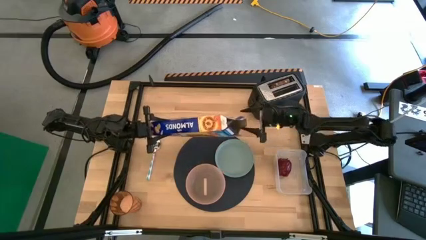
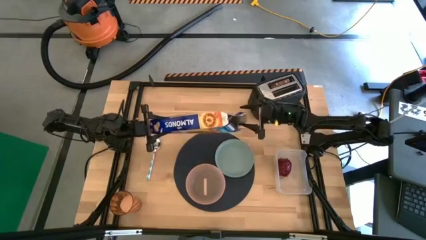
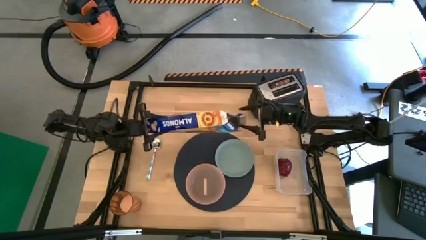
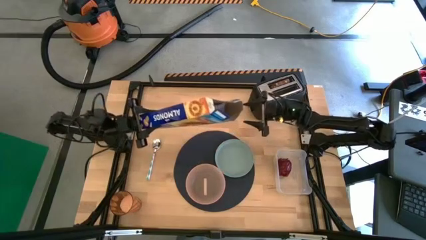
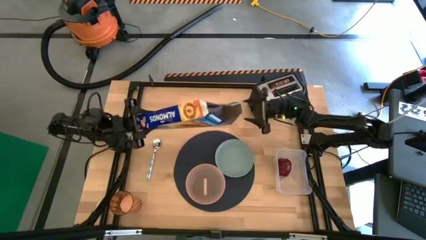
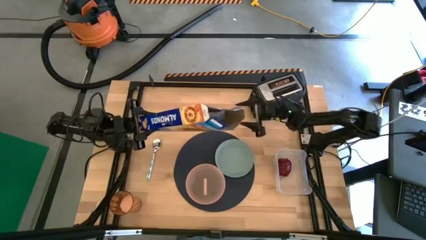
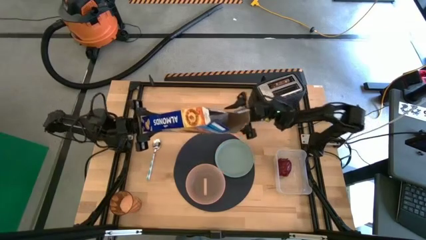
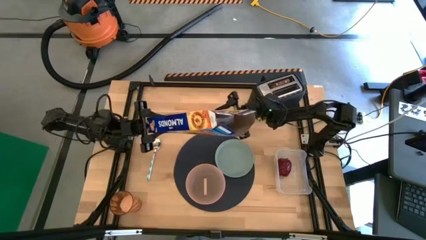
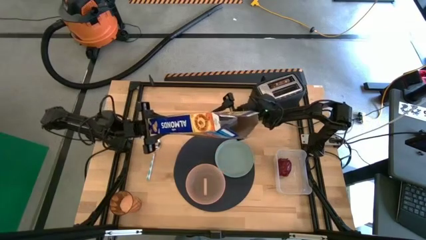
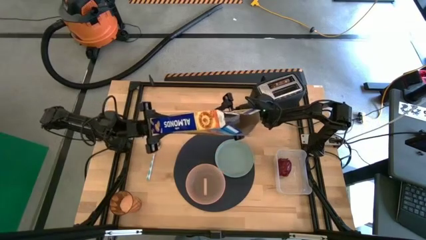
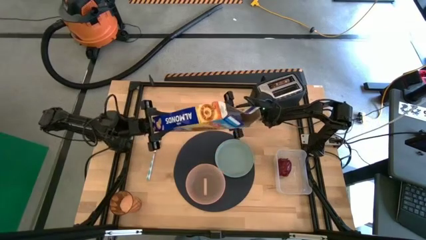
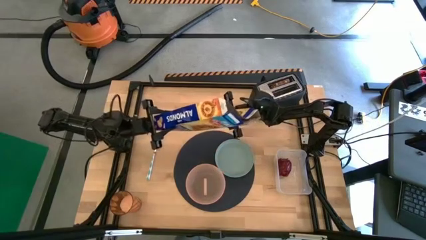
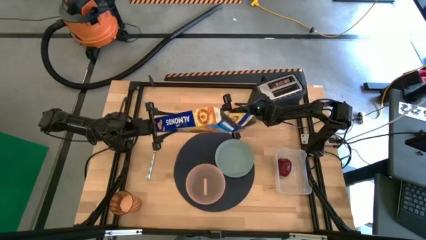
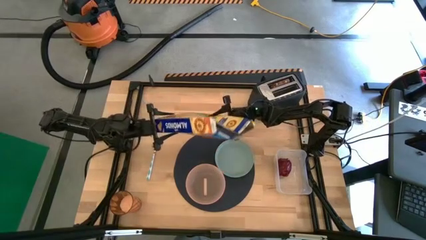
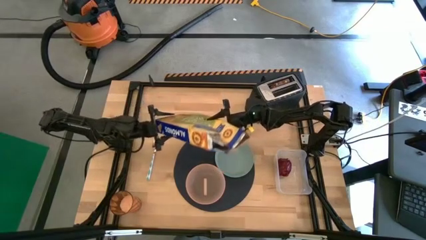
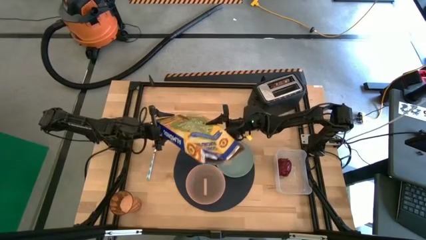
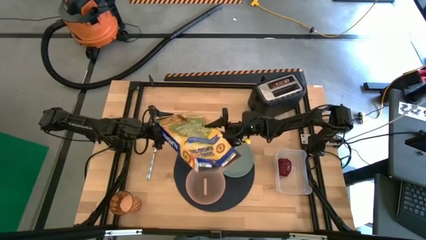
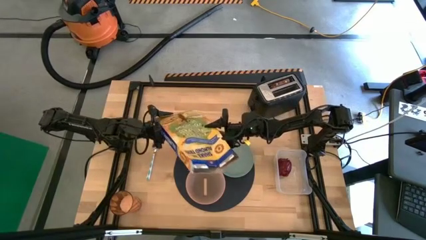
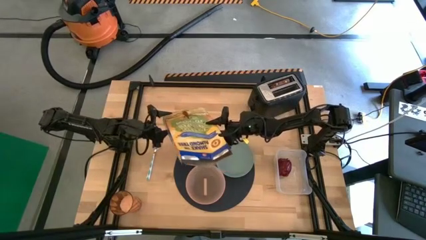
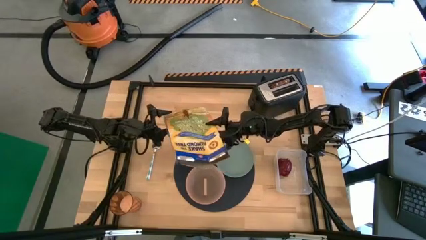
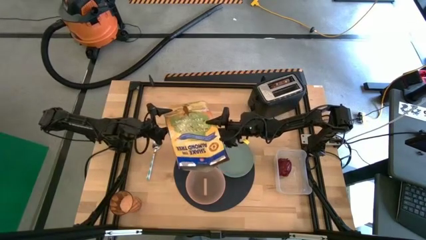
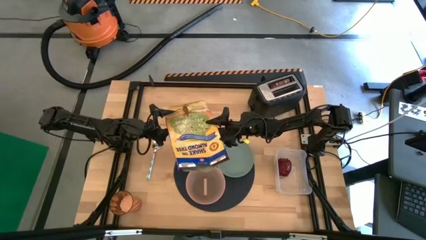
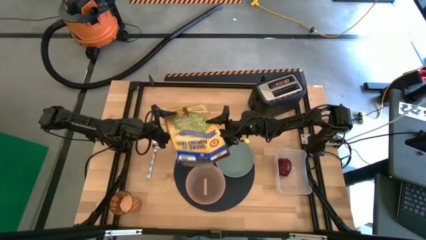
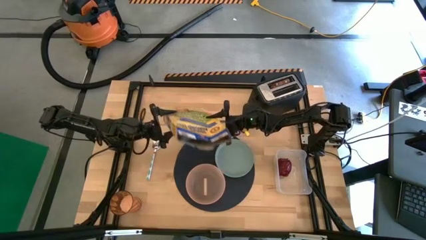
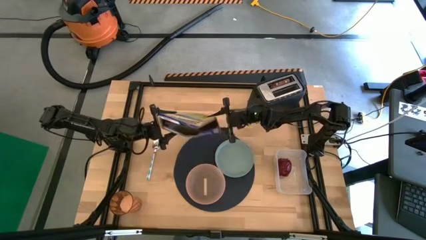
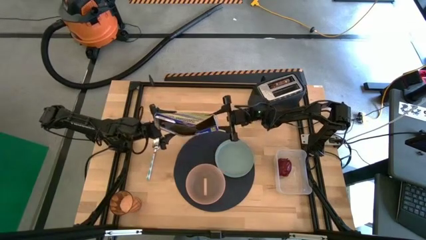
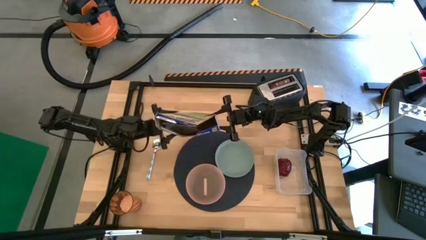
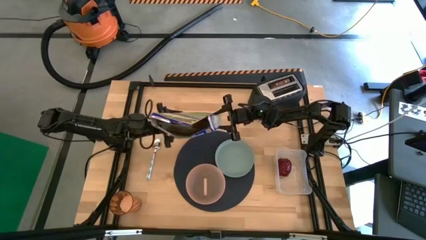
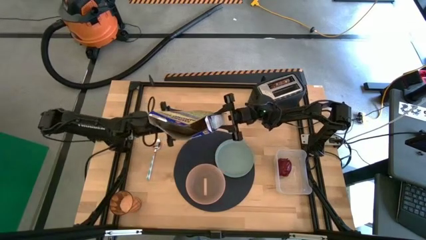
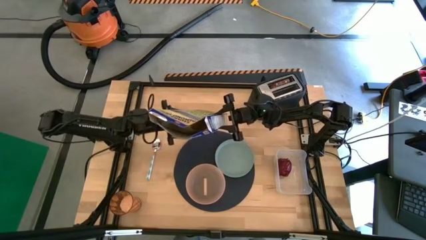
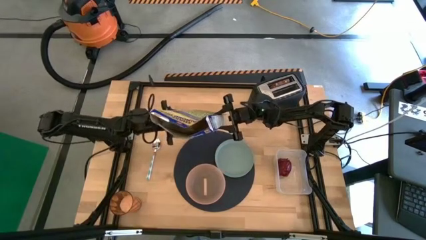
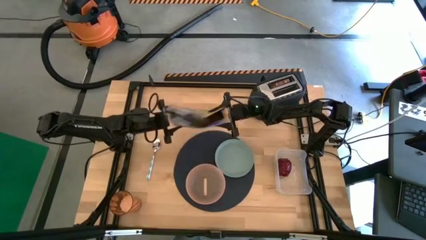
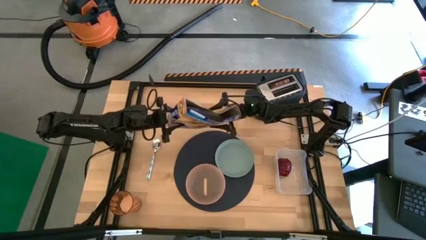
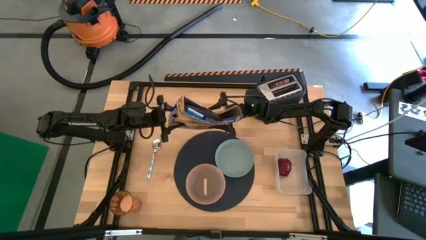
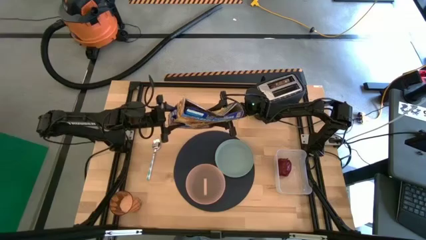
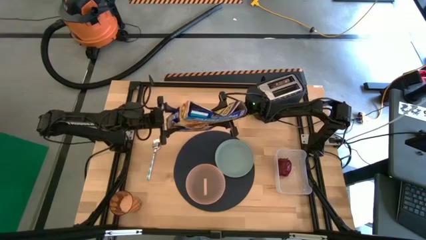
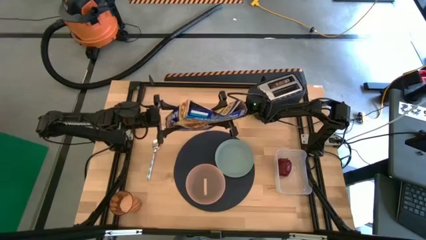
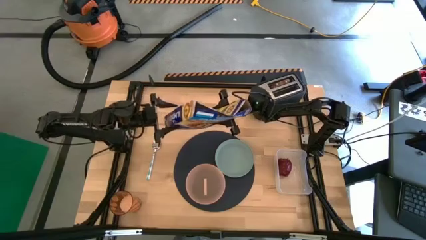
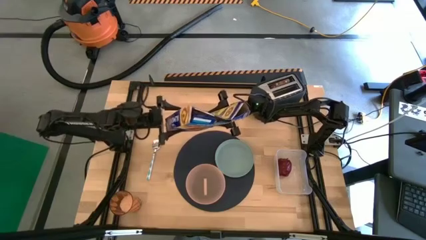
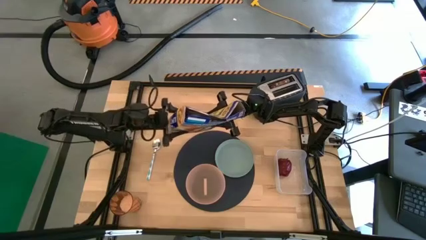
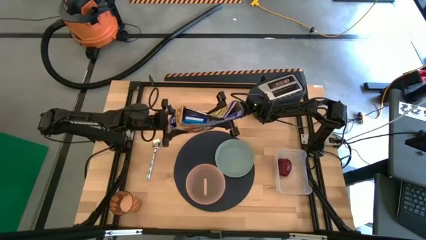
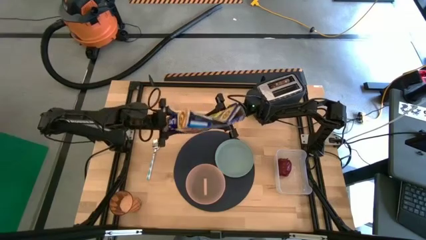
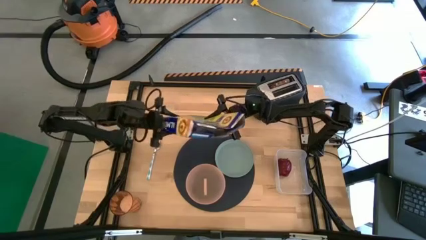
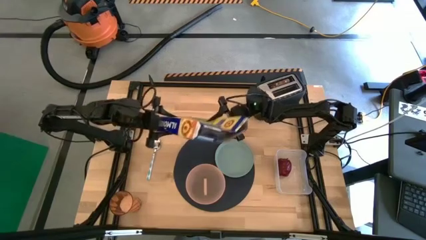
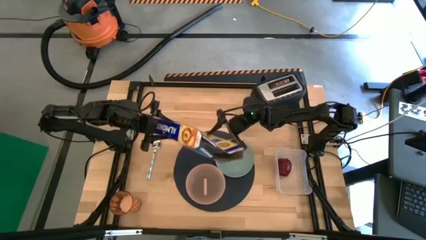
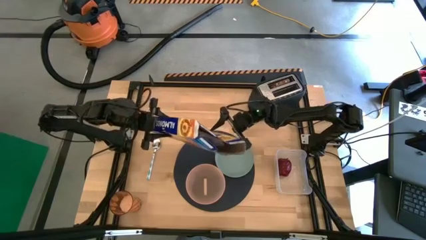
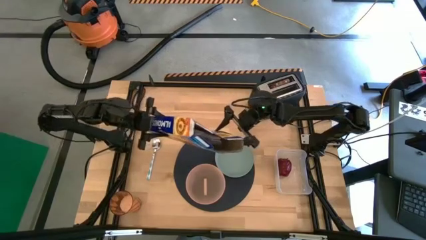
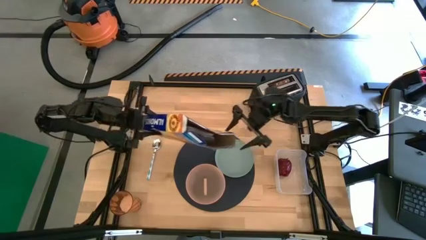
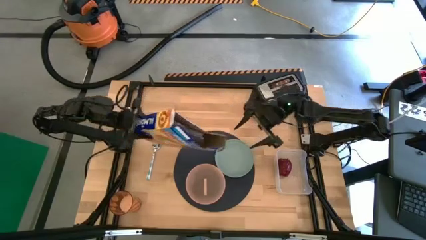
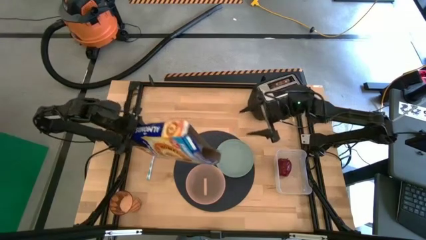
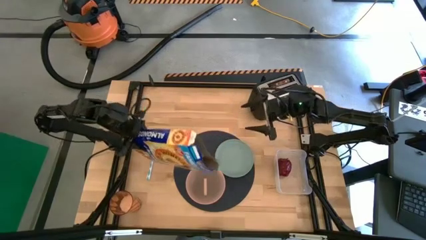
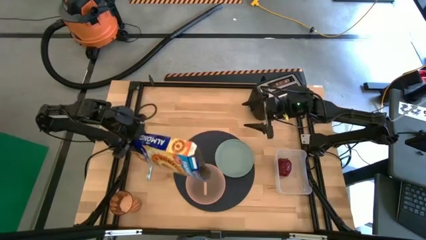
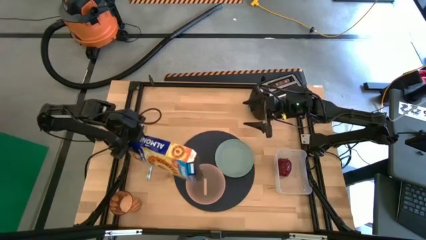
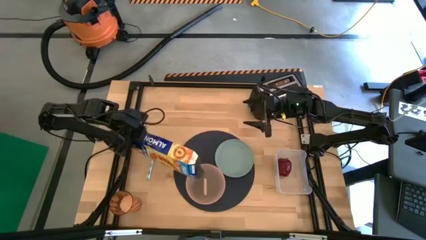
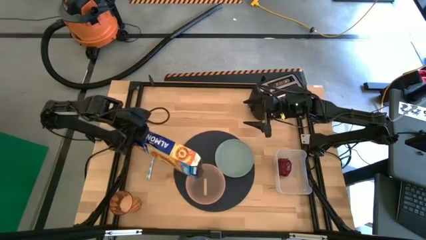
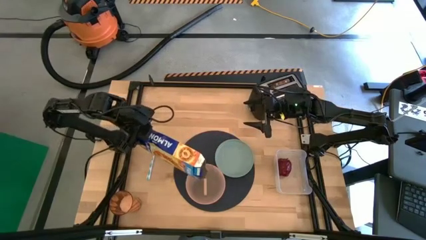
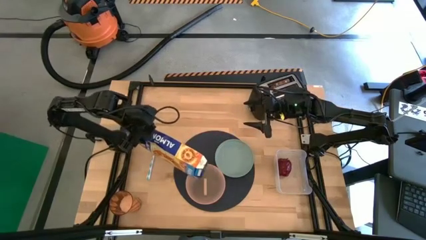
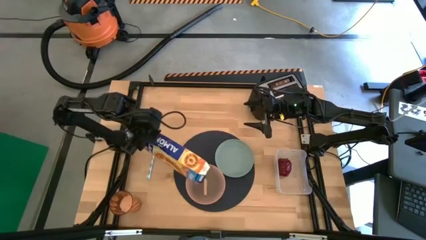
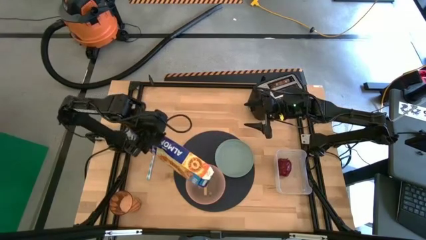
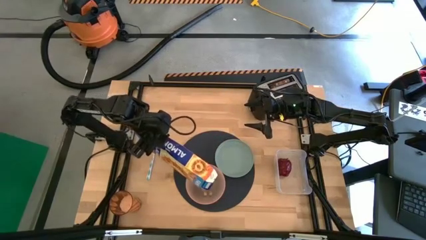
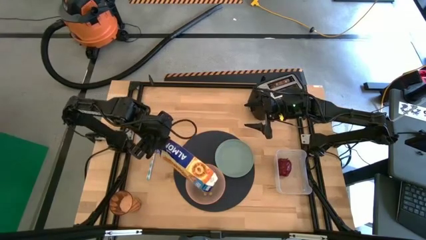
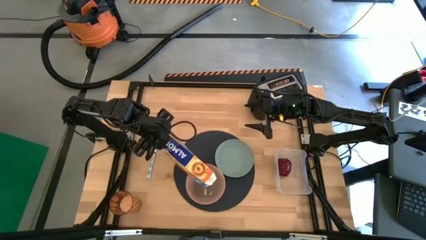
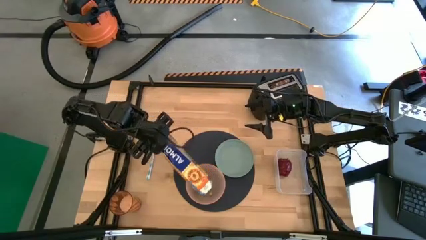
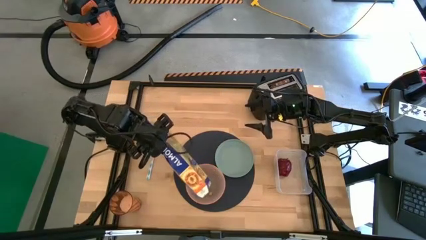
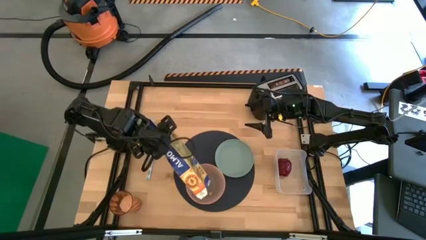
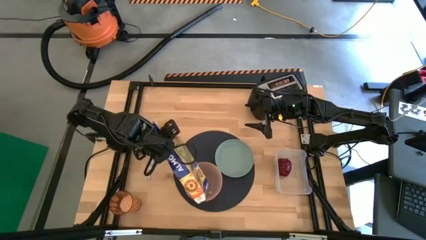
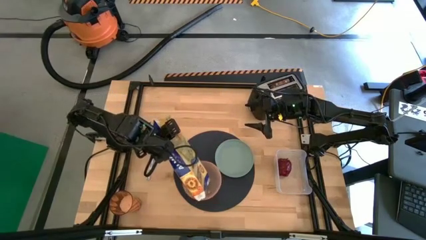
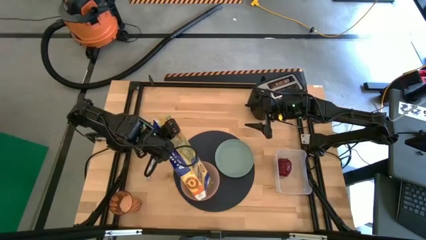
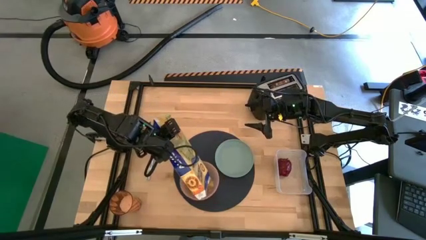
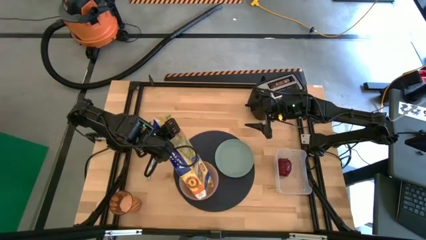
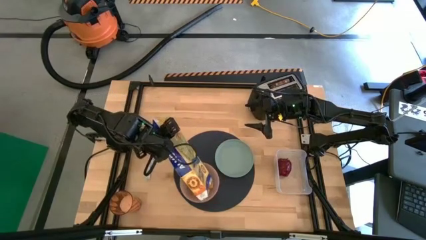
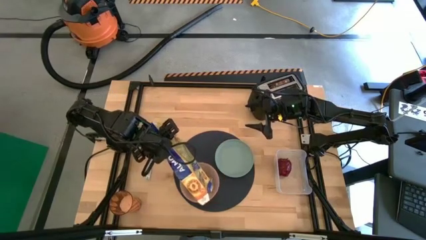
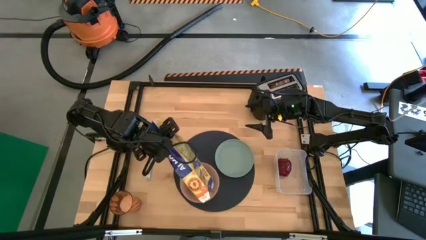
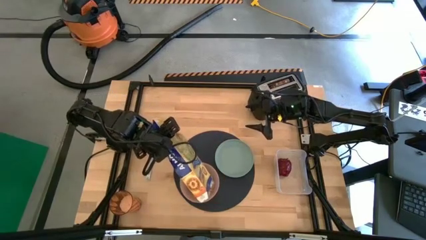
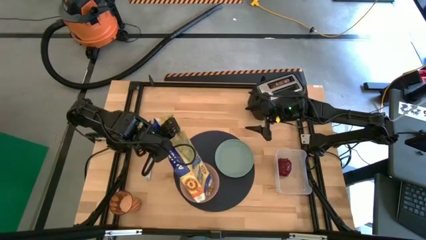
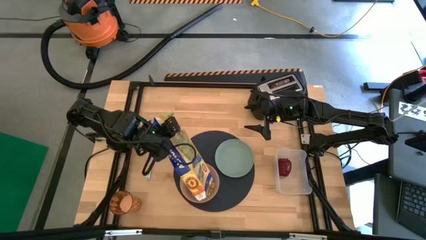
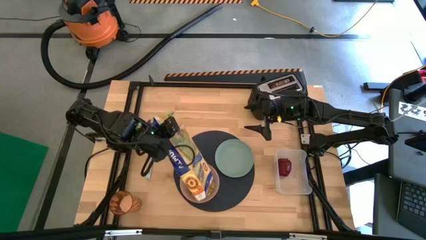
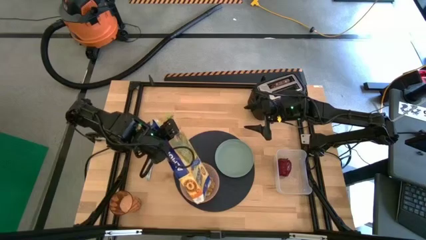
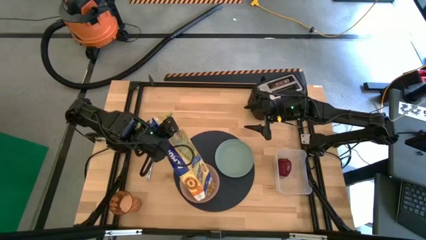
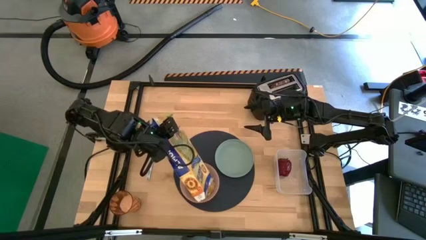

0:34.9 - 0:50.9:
Task: Arrange a breakfast setting
Pour the cereal from the yellow cereal box into the pink bowl
